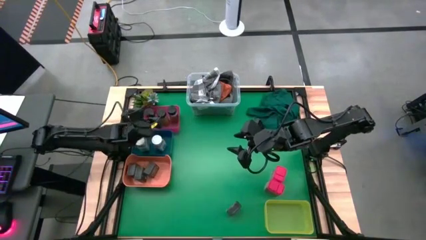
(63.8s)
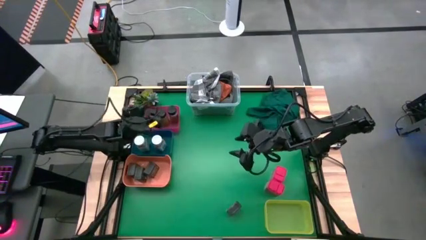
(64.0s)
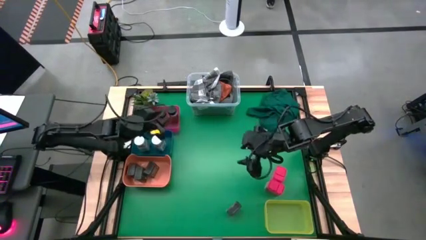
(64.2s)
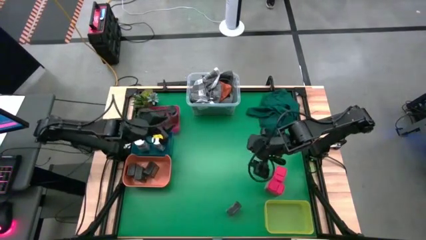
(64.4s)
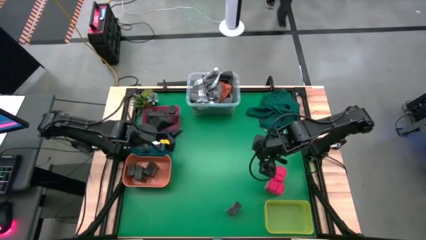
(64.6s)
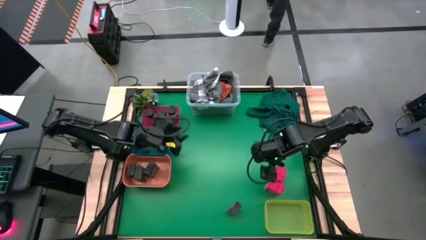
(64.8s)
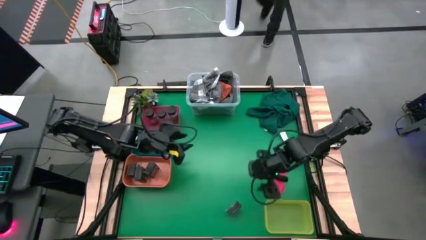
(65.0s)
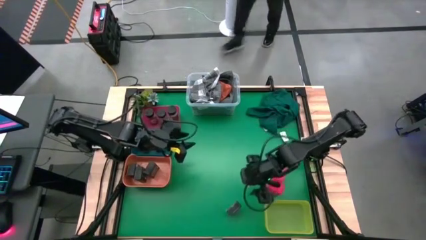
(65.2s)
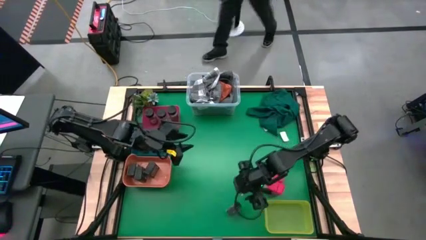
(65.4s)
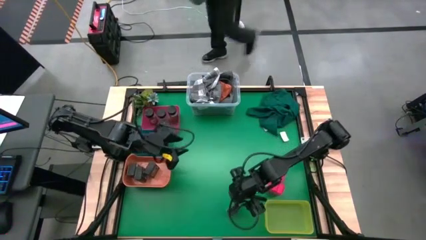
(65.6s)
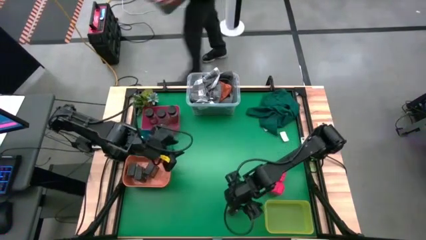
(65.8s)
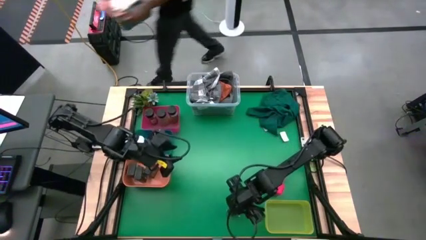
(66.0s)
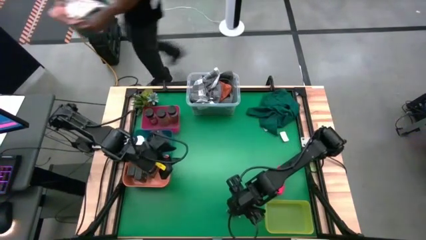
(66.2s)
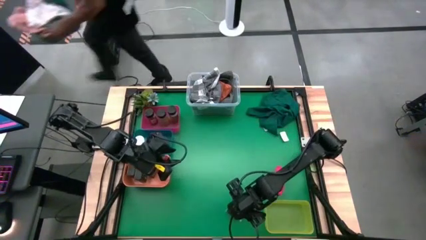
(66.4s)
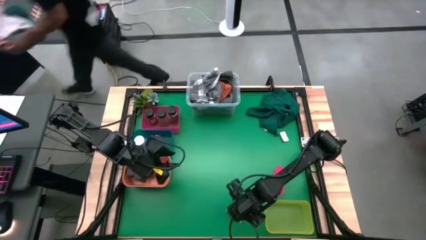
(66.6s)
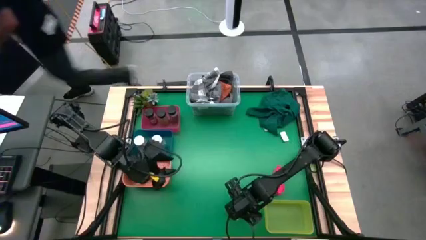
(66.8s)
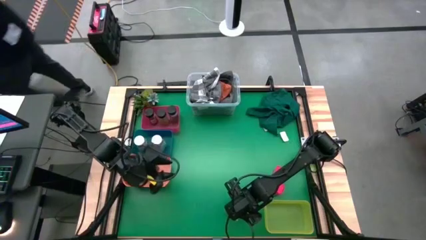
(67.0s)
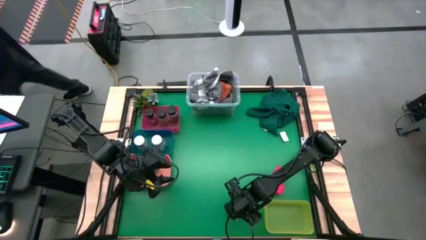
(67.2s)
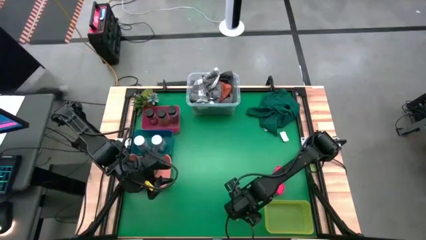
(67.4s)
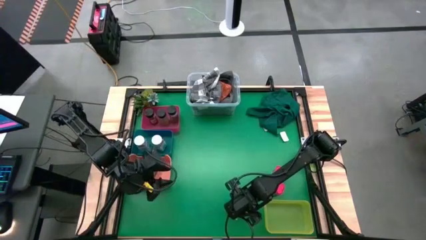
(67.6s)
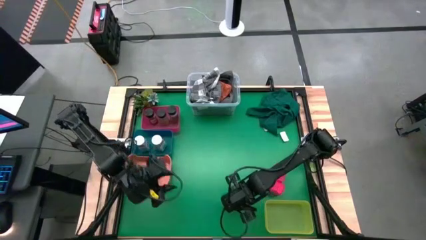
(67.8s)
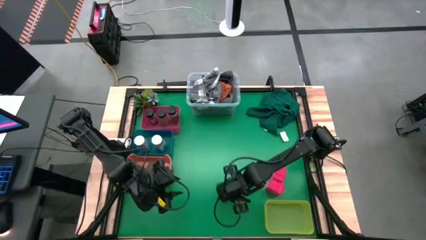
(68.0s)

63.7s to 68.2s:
Task: Sort spices by type
Put the black spice can into the orange bin

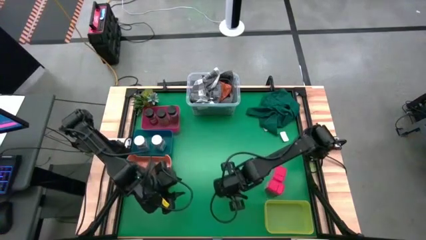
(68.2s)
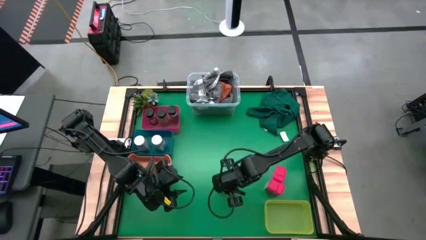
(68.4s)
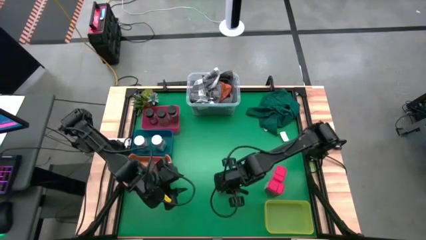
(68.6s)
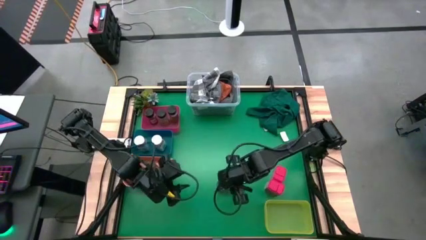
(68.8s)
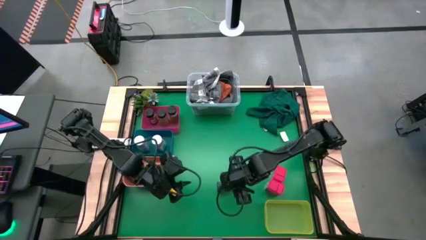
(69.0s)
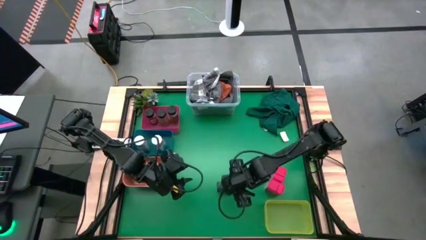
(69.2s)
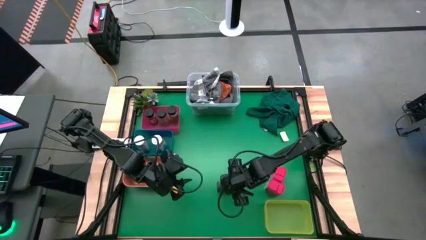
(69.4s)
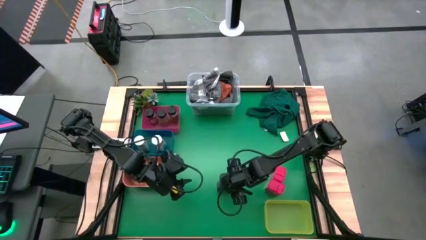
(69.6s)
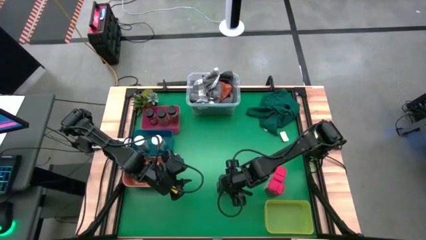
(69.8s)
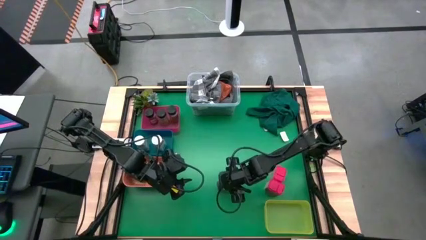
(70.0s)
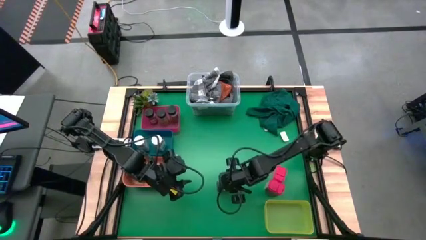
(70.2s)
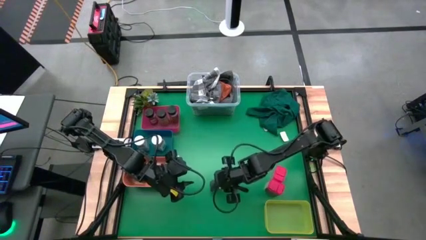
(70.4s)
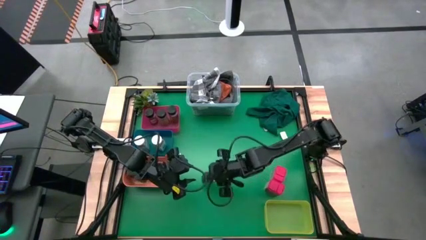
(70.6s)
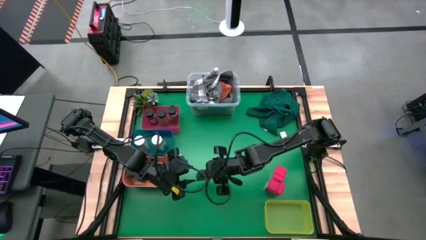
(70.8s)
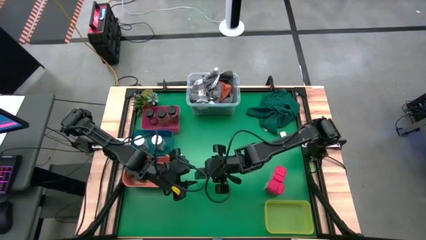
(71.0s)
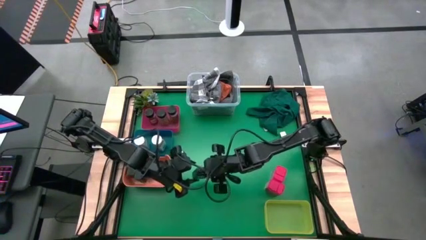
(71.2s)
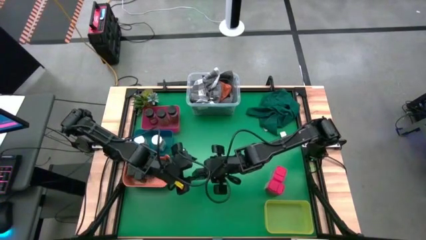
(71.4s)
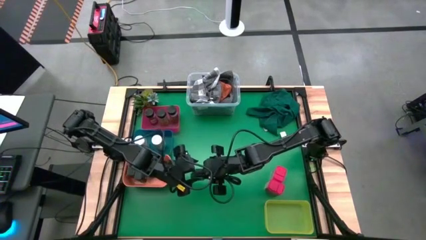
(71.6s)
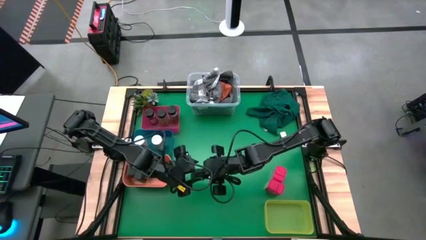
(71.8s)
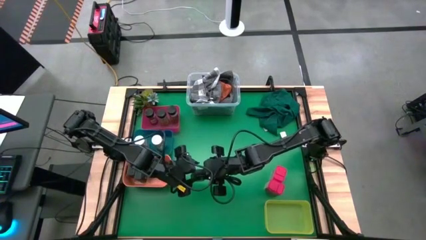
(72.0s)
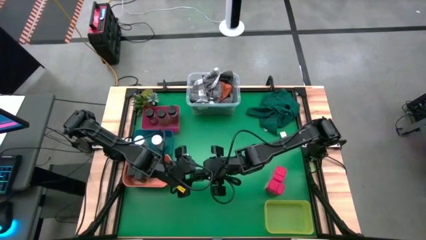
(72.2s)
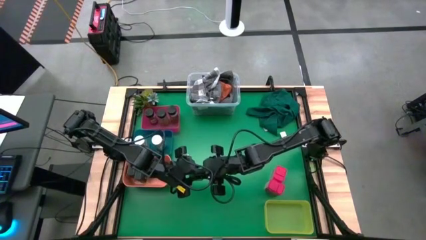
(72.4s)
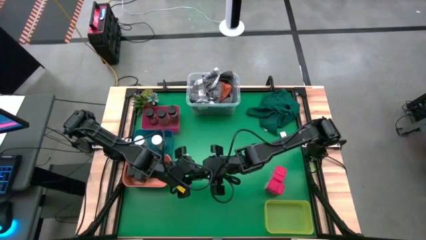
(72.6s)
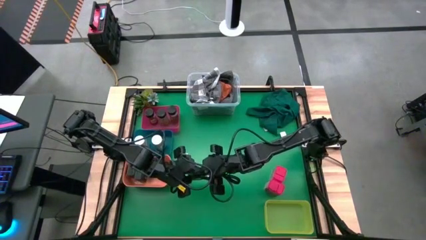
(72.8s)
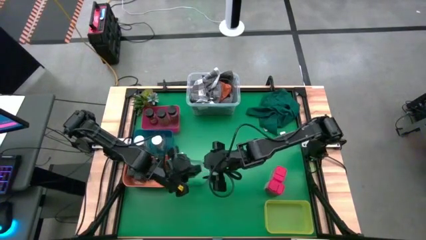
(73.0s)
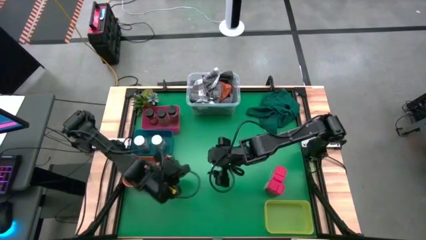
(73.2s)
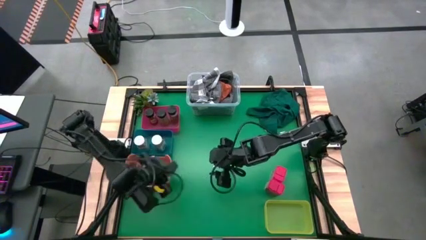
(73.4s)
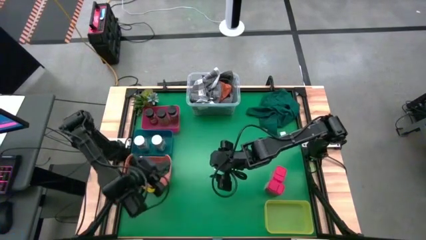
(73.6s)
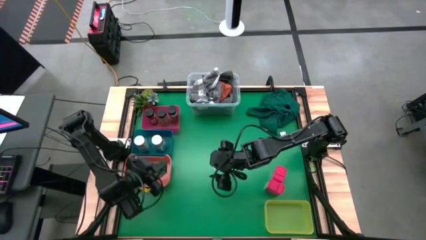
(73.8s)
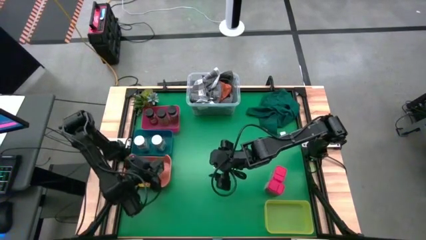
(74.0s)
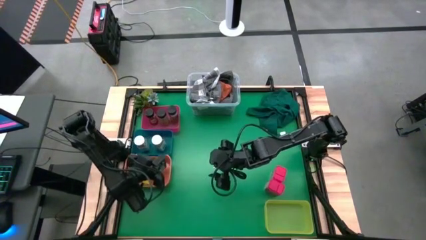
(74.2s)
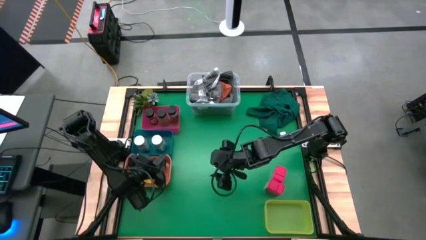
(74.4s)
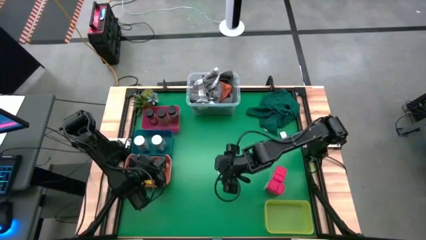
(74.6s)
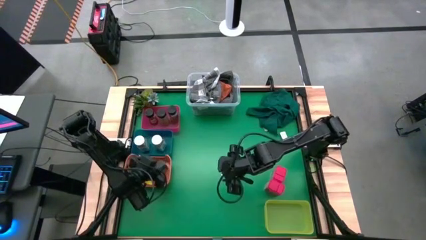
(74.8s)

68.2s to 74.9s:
Put the black spice can into the orange bin

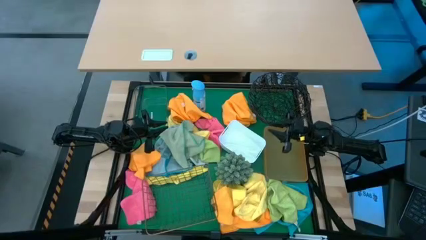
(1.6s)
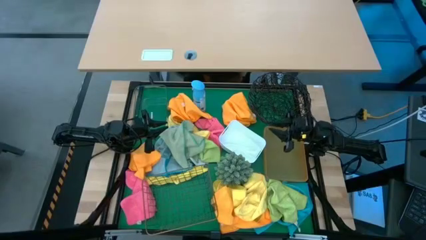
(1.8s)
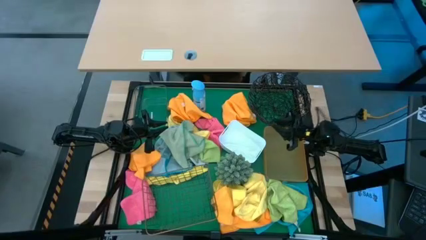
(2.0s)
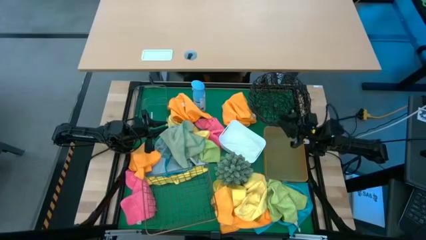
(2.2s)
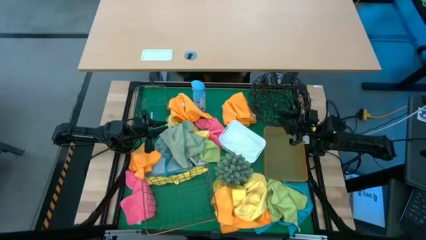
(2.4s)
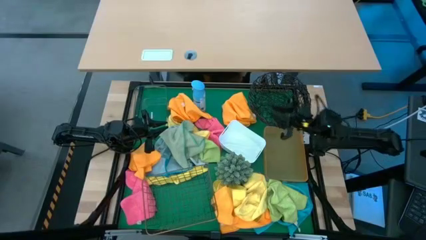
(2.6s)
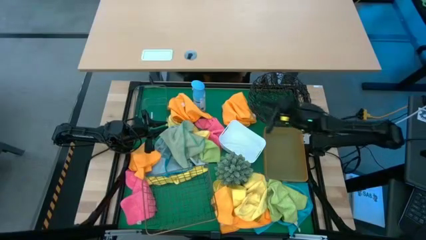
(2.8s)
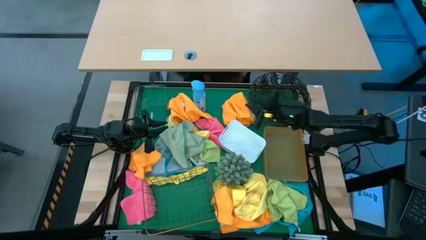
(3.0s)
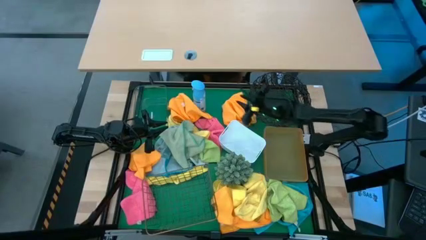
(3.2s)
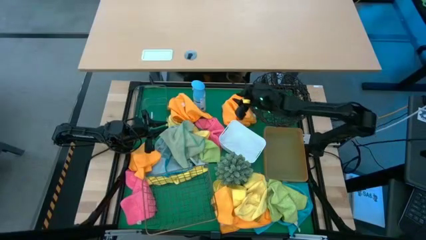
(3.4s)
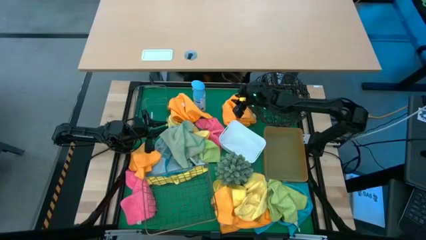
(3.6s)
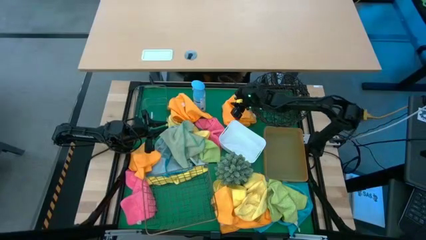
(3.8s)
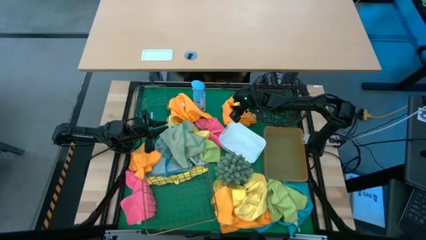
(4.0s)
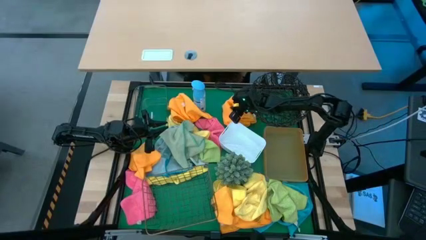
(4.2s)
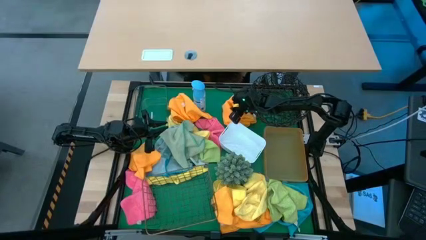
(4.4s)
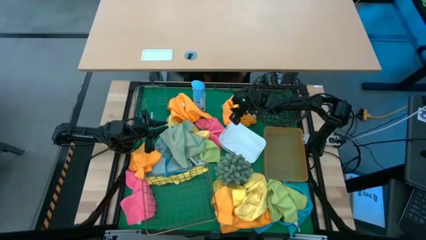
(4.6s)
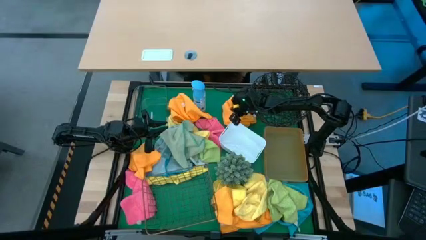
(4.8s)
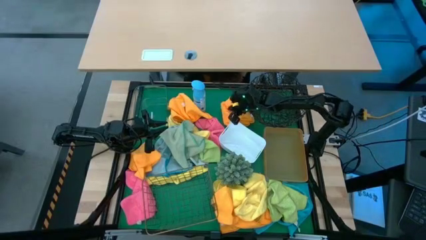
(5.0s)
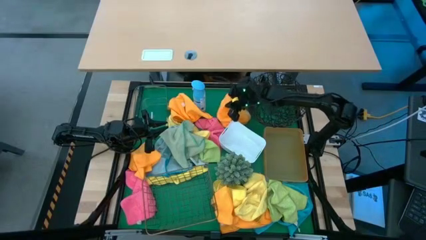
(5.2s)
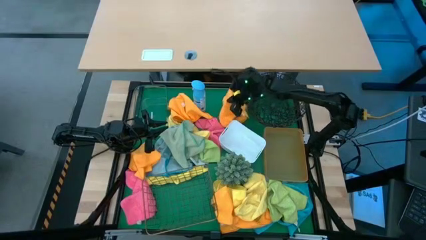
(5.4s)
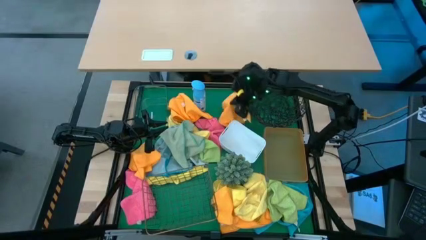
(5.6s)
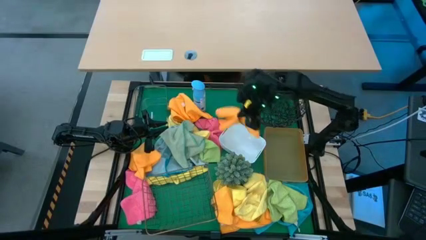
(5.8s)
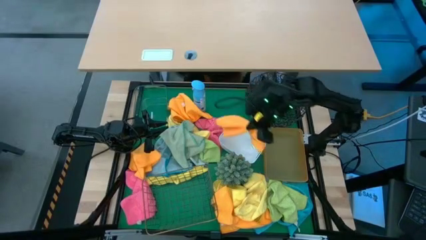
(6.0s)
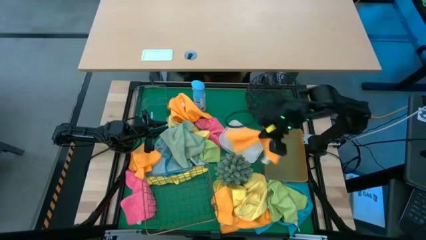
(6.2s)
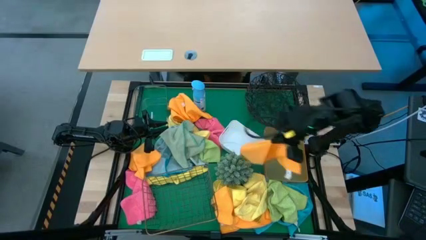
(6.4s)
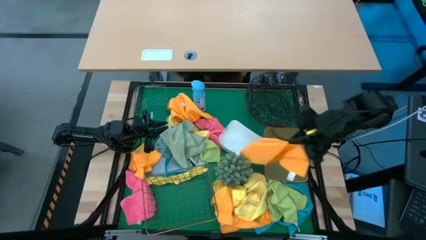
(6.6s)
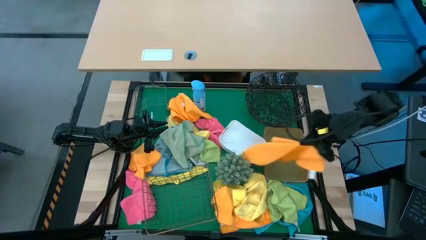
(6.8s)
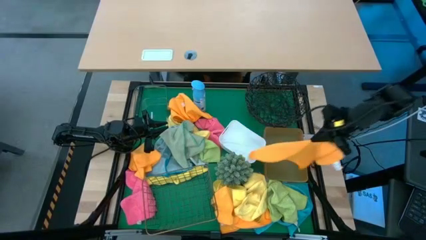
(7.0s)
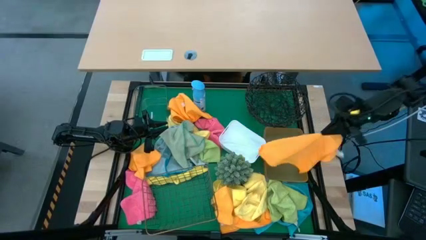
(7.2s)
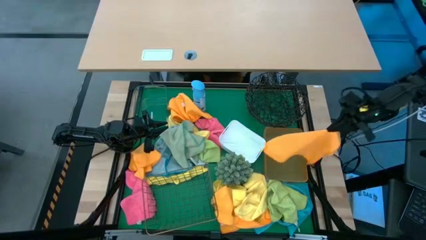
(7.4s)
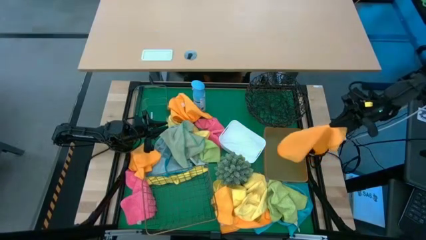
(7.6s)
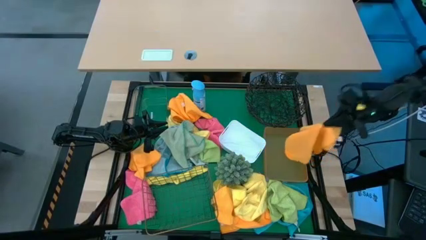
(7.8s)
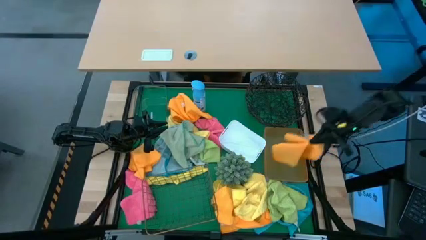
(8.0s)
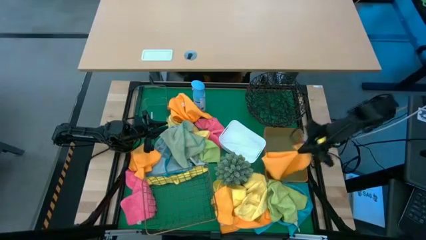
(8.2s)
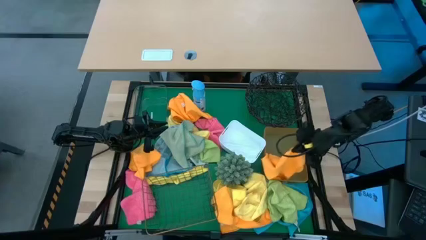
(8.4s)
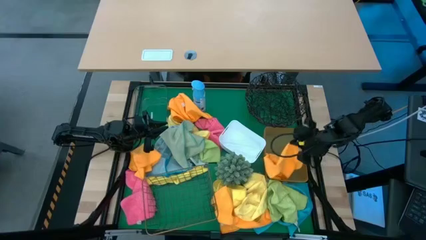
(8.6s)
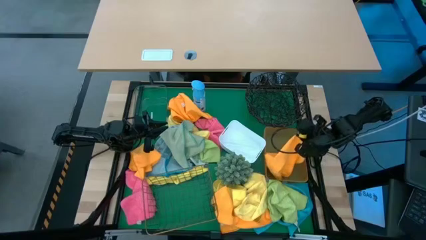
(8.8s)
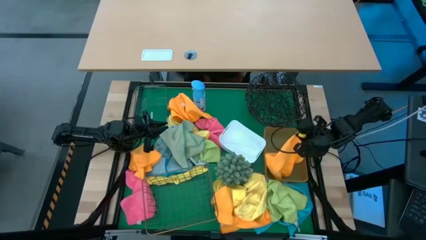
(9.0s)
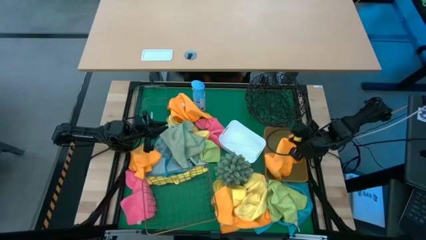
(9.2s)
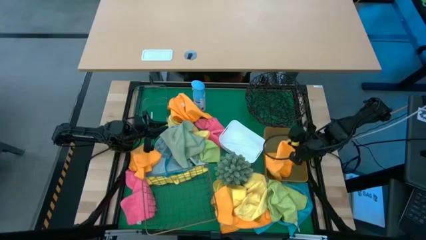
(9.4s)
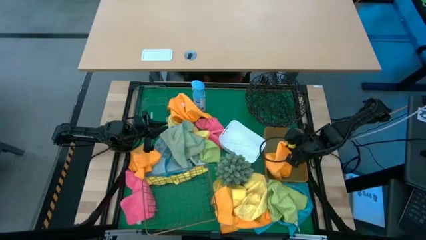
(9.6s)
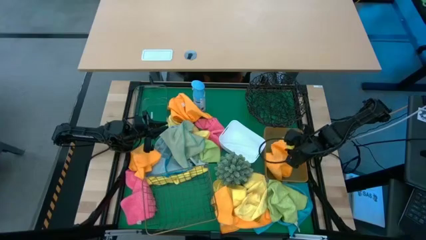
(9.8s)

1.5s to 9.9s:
Task: Sort microfiber towel by color & place in baskets
Put the orange microfiber cloth into the orange bin
